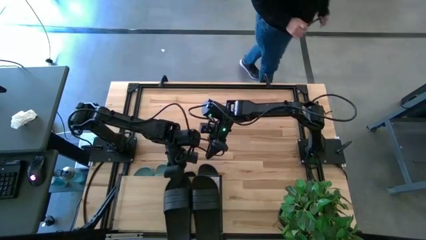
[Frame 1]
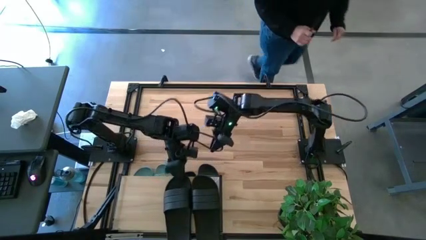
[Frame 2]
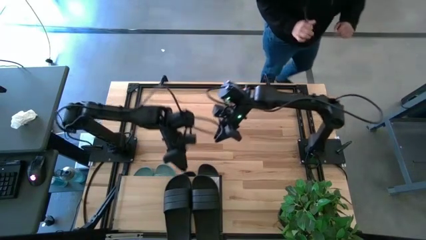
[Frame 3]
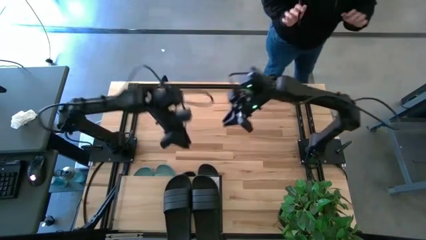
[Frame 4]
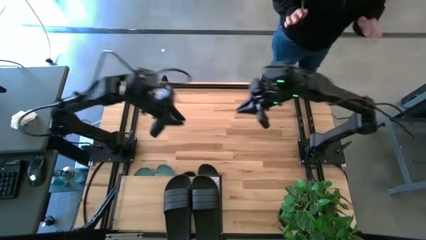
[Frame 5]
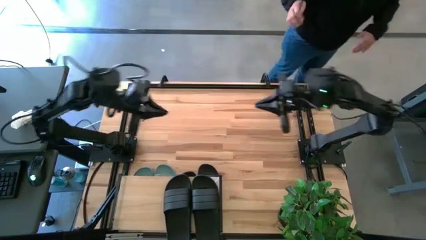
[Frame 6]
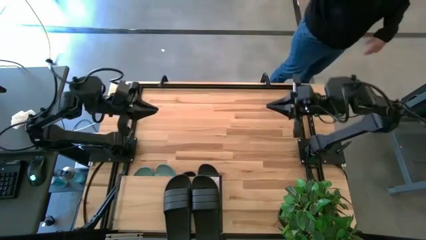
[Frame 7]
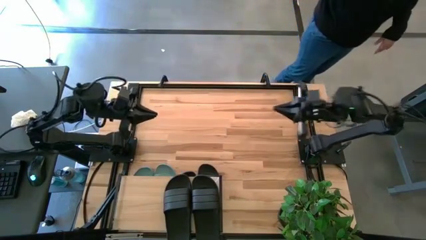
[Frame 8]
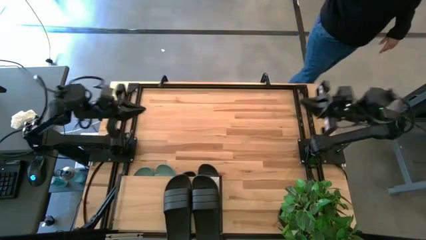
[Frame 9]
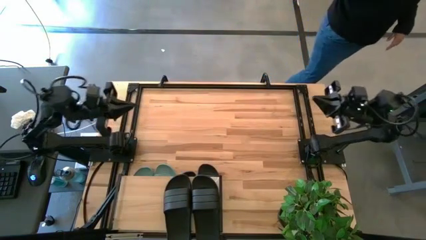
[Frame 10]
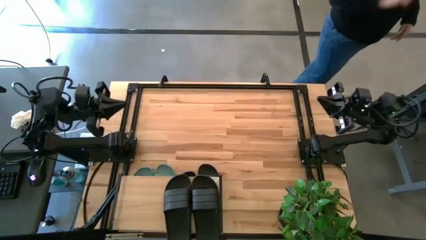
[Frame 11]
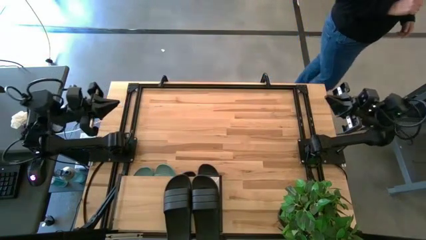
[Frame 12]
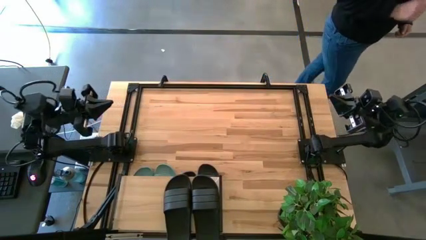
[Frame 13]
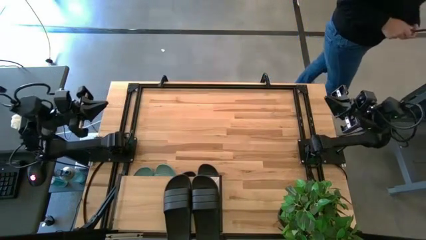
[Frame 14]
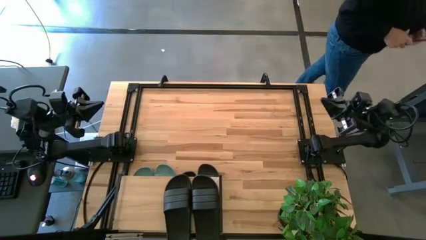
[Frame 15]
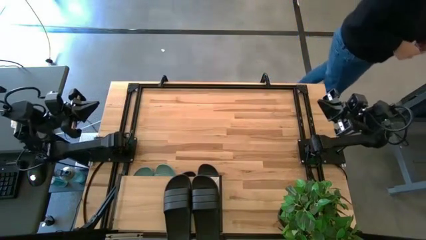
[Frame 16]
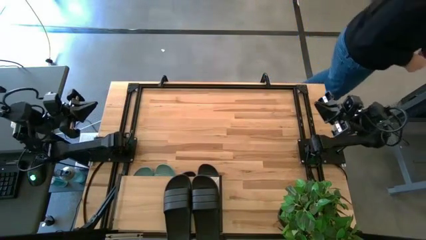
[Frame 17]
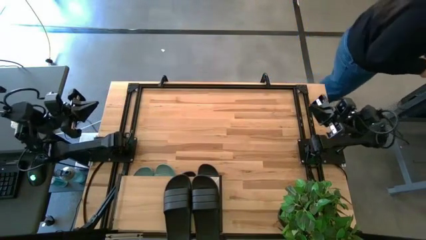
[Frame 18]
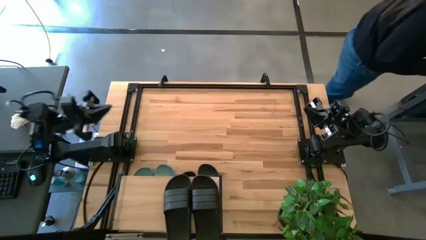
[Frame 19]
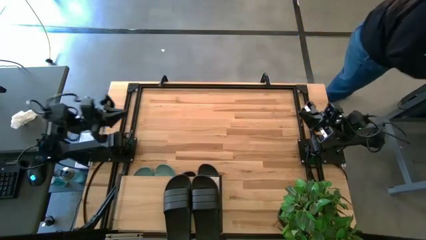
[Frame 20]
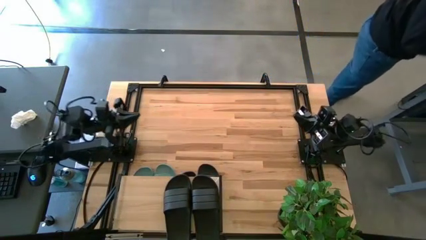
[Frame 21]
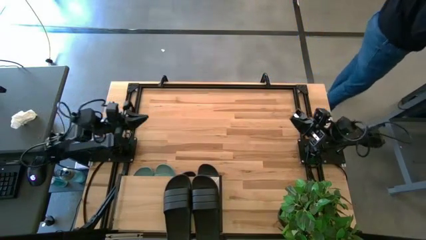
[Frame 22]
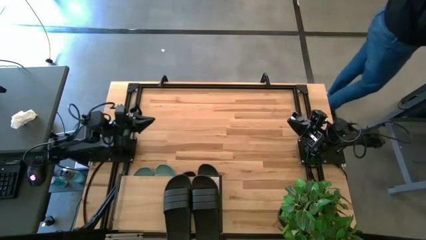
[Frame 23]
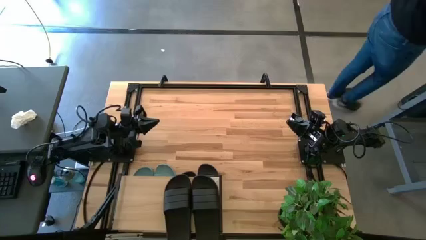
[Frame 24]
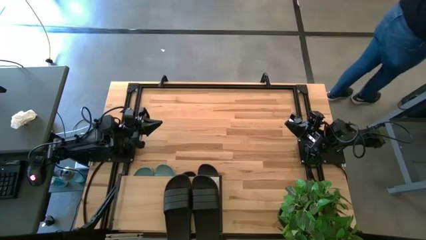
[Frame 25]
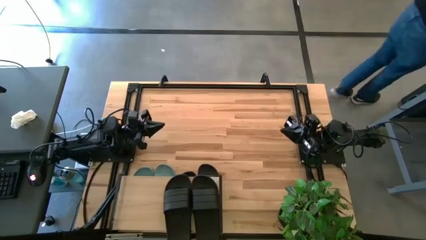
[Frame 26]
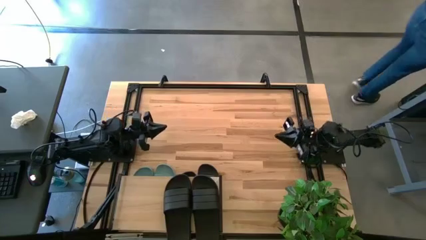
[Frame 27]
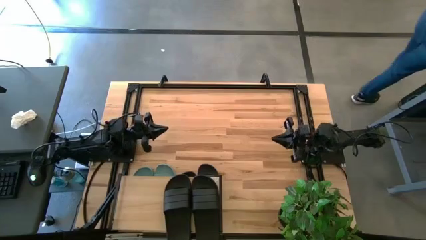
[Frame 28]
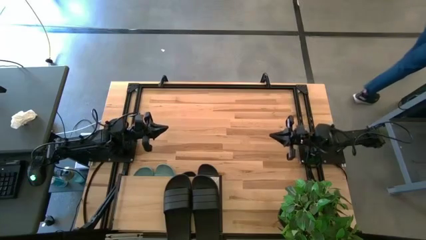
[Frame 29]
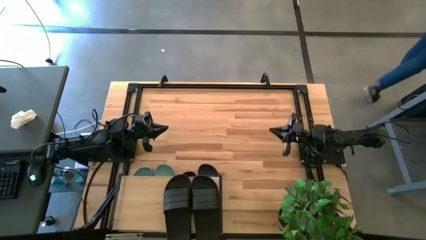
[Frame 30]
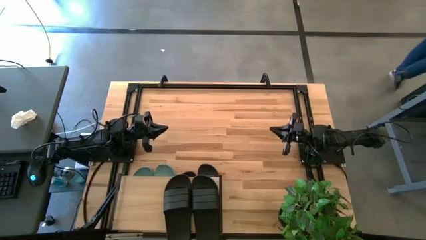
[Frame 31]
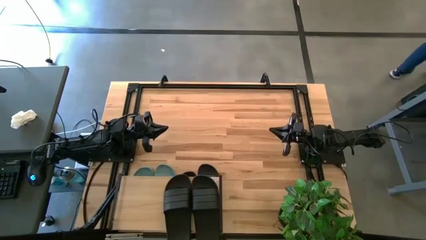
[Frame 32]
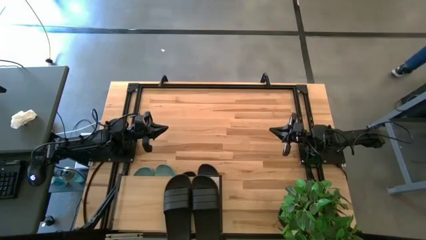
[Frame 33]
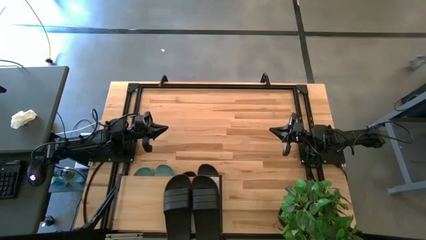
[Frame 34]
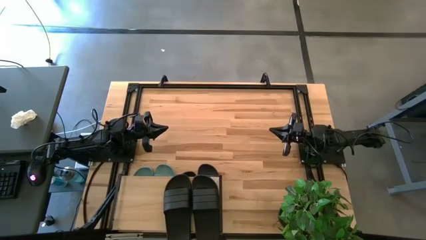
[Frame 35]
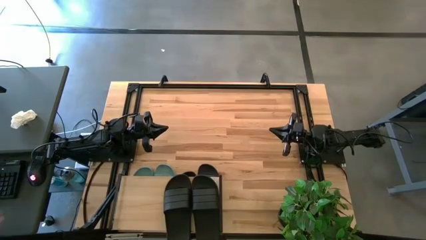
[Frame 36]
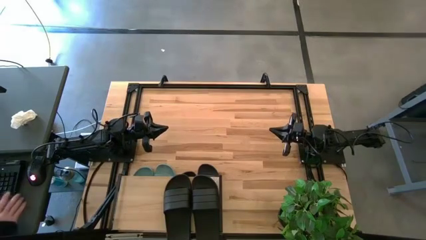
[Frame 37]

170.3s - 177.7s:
Task: Pick and place slides into the shelf
Return to Home Position

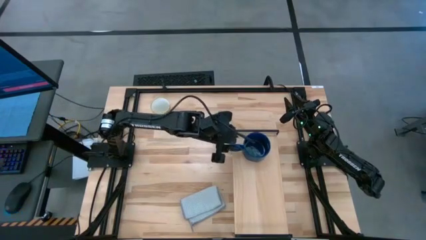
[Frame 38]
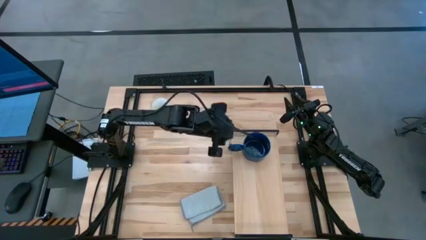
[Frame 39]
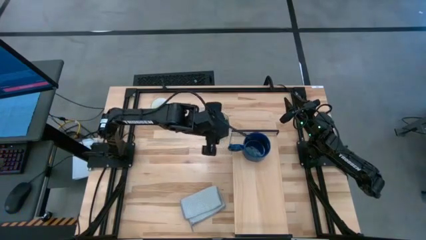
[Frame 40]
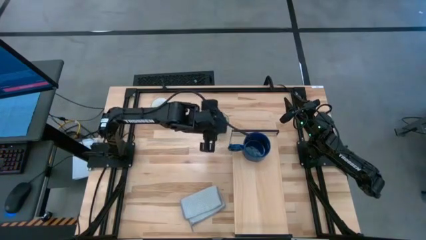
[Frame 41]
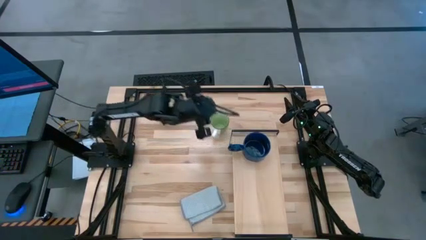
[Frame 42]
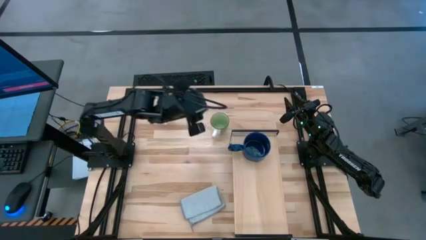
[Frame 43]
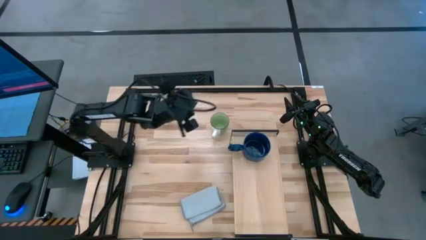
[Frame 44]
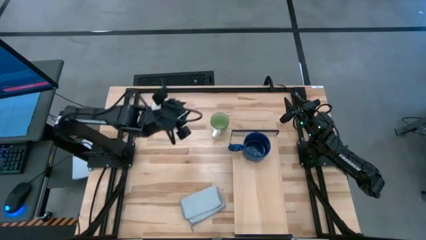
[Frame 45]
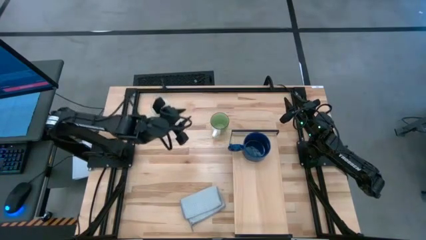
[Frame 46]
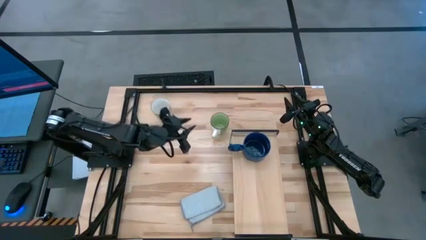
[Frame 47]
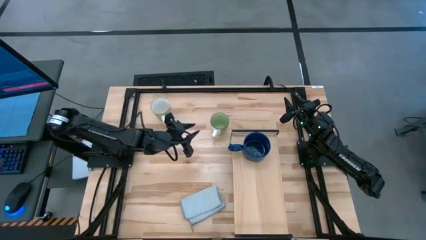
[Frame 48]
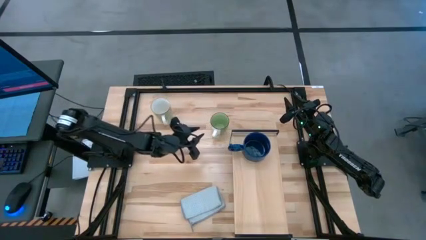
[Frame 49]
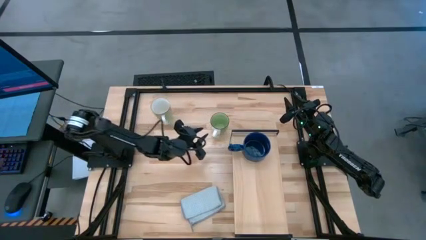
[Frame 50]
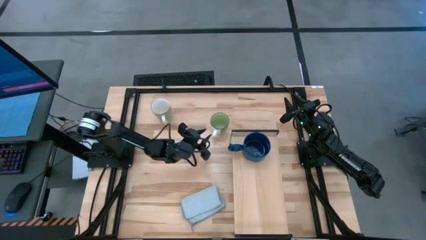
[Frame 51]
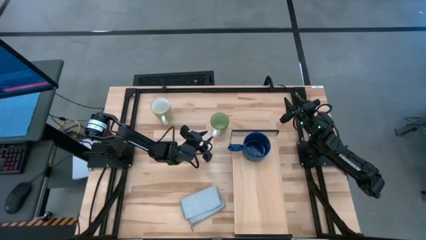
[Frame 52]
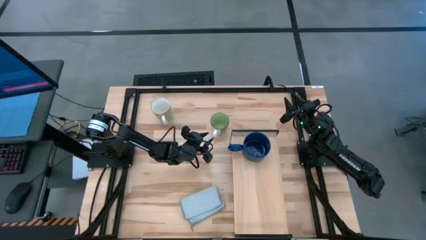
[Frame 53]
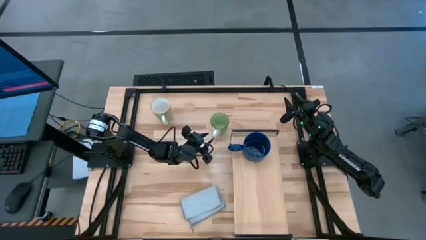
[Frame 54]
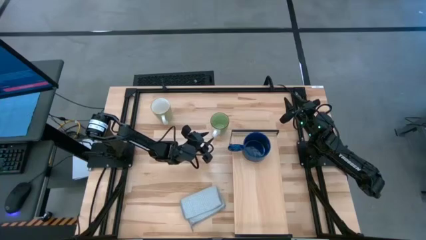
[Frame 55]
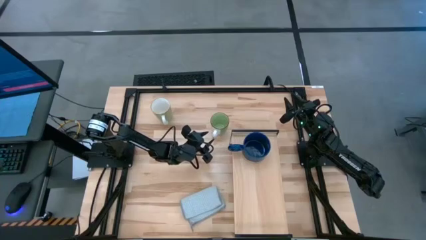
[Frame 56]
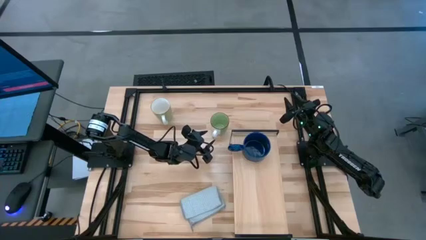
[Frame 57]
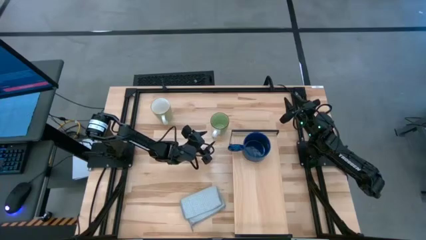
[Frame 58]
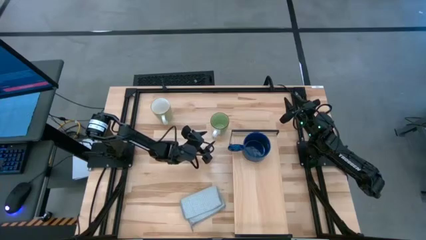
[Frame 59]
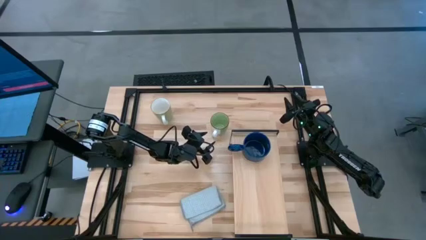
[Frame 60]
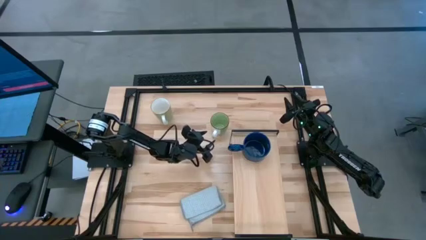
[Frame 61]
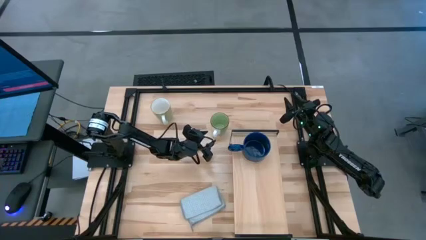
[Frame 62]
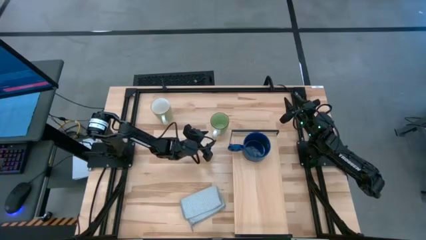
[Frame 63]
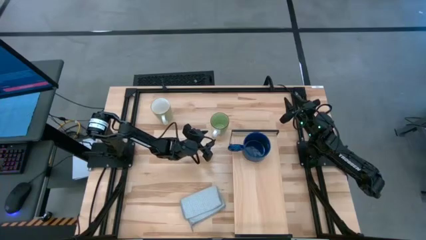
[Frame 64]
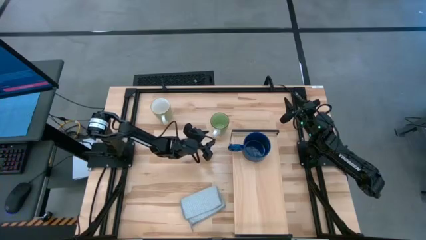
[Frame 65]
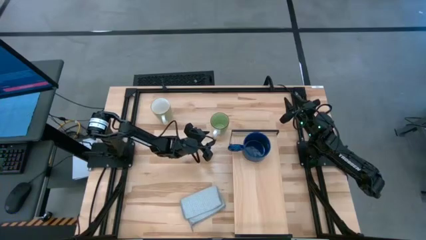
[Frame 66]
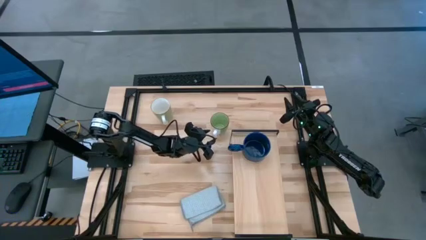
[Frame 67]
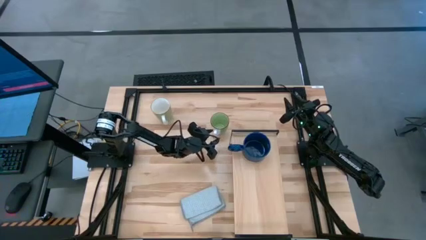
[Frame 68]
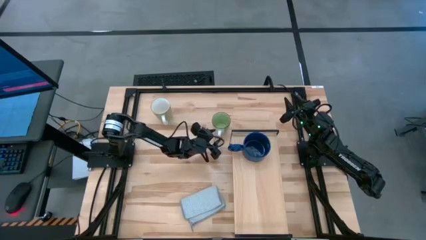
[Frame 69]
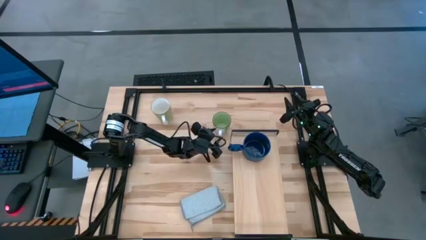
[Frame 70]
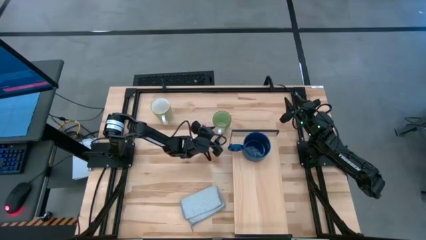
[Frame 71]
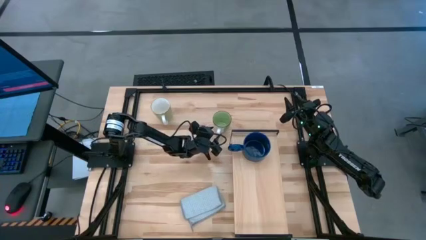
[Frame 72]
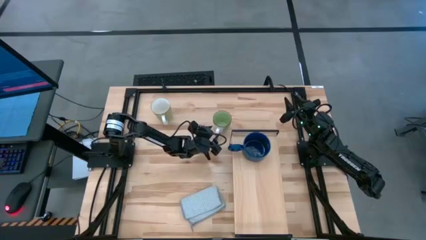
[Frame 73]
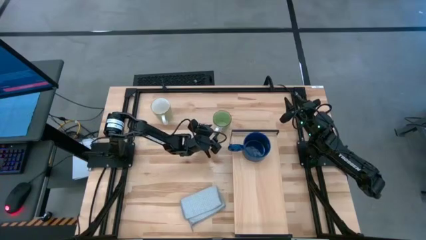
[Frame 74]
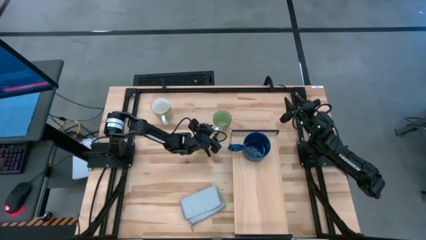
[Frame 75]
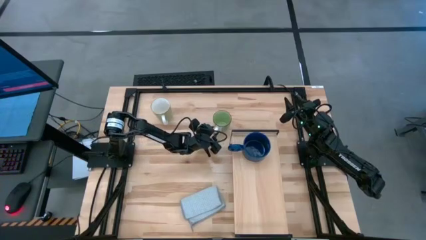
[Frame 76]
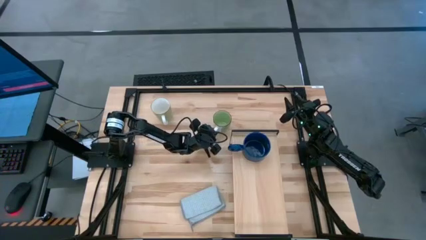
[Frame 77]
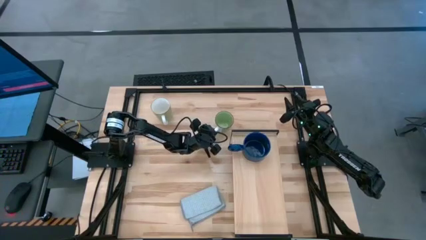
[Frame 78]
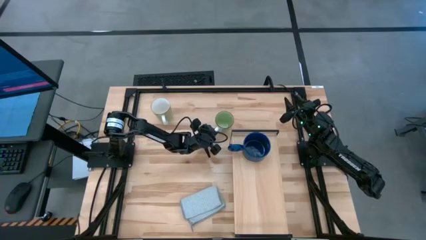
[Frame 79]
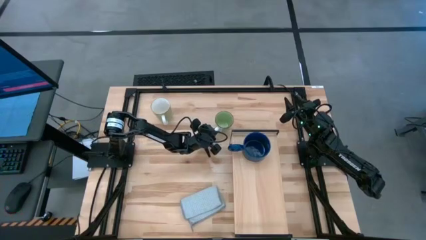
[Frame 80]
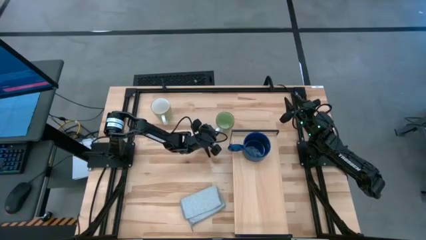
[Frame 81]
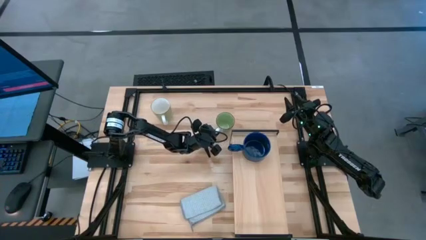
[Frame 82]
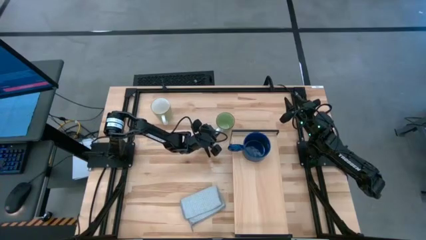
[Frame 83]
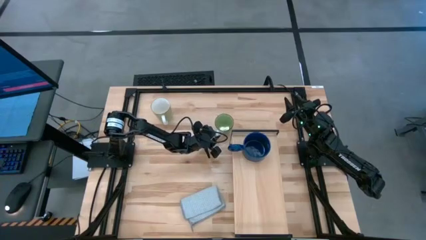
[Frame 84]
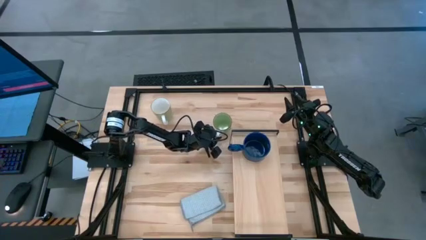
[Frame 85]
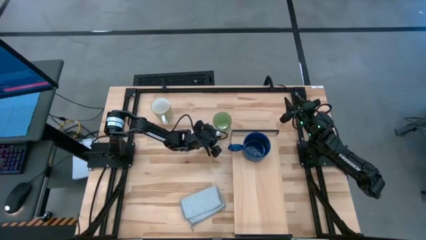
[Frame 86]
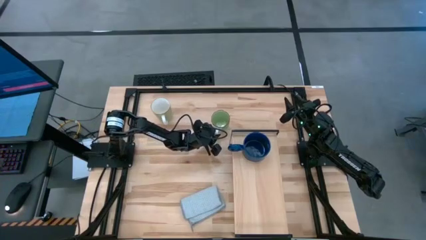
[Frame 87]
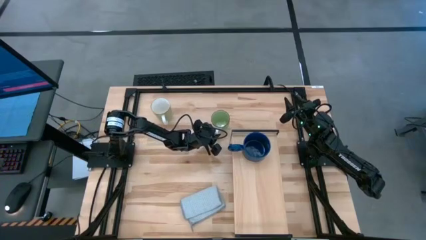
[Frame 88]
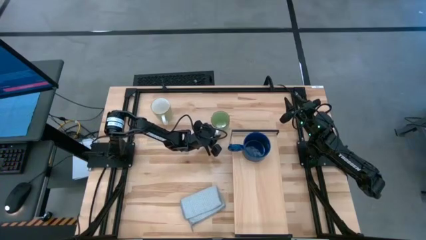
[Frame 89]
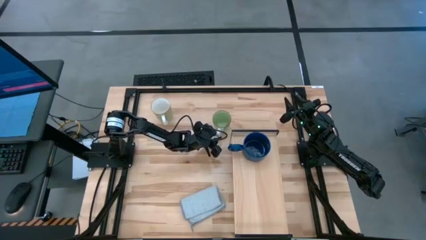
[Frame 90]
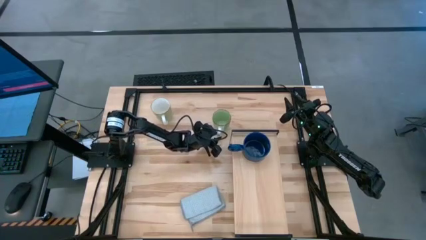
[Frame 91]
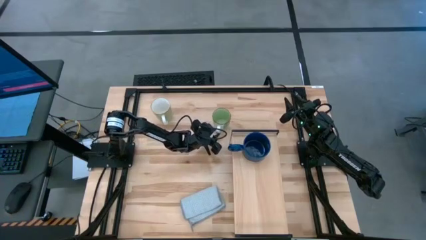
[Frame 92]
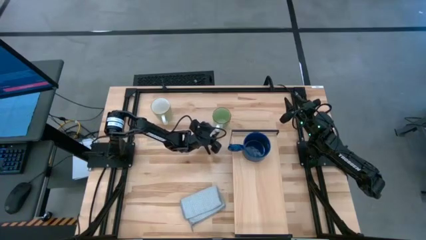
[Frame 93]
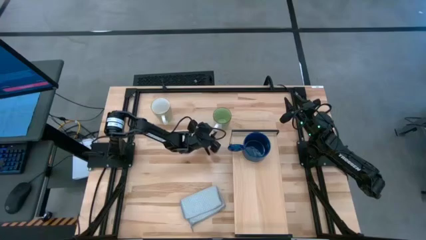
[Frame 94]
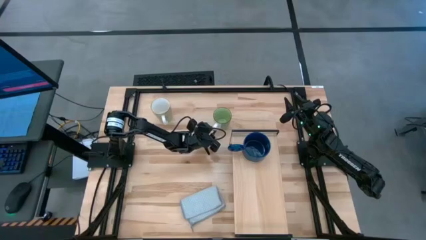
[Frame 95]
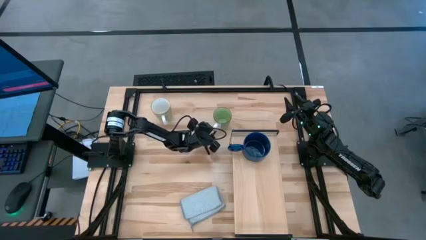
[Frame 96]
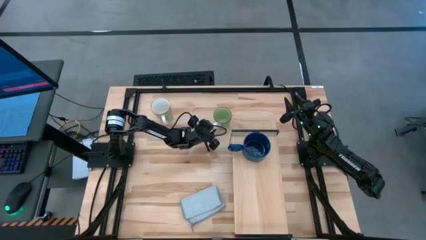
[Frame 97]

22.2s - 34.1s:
Task: Stack small to large cups/mugs on shelf
Put the light green cup on the shelf
